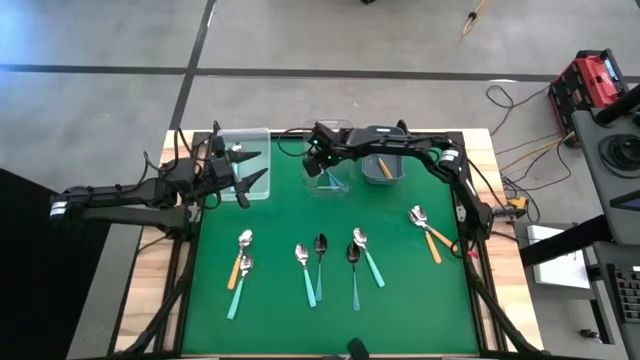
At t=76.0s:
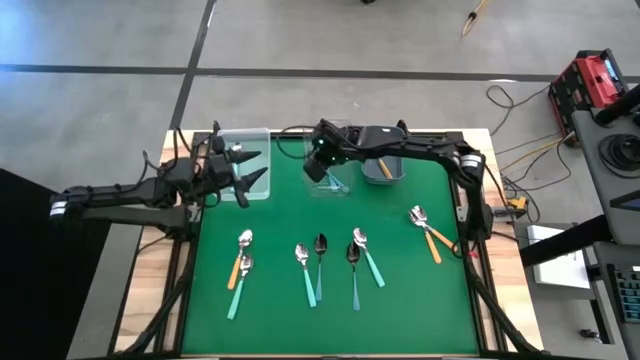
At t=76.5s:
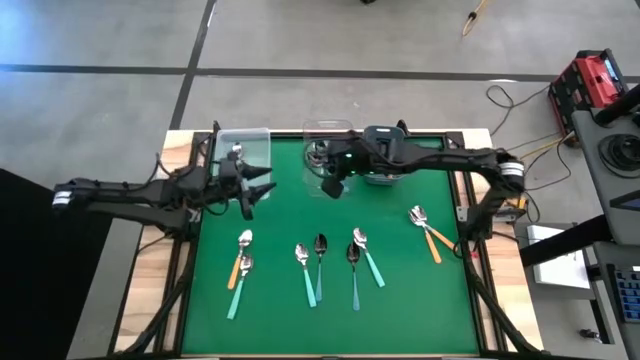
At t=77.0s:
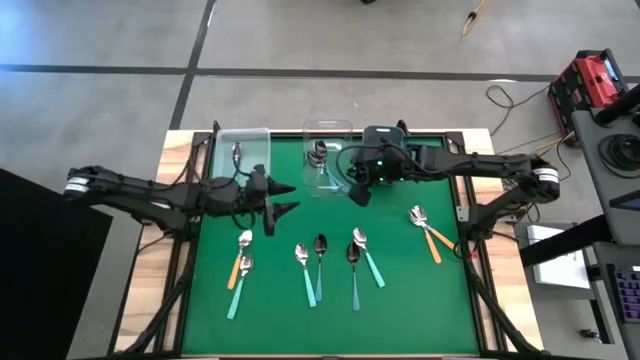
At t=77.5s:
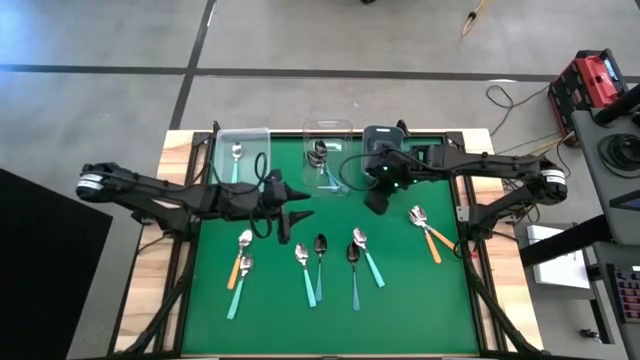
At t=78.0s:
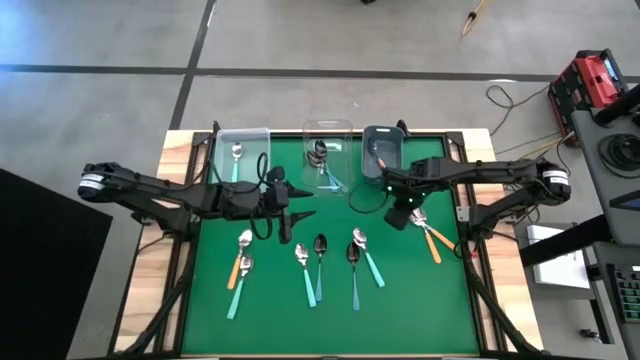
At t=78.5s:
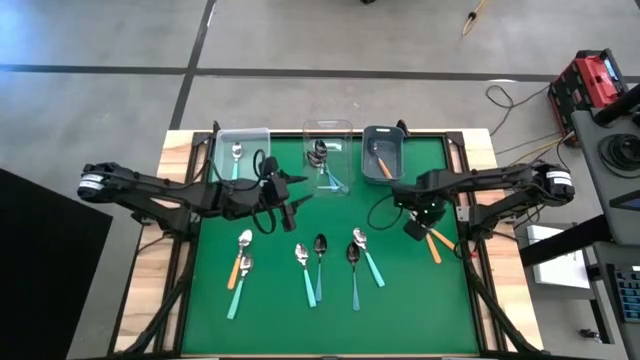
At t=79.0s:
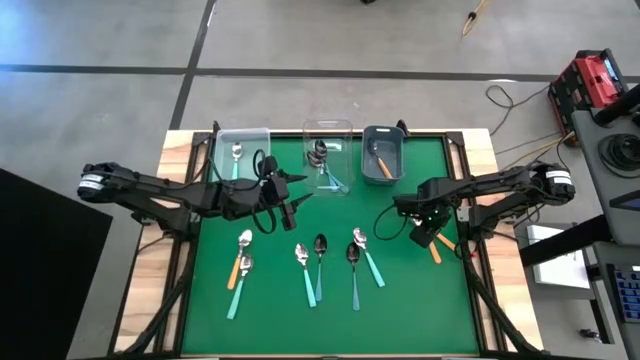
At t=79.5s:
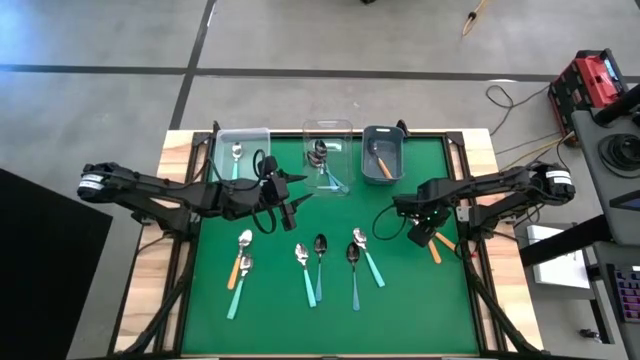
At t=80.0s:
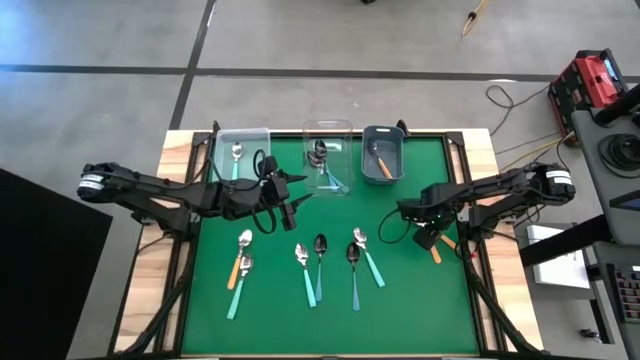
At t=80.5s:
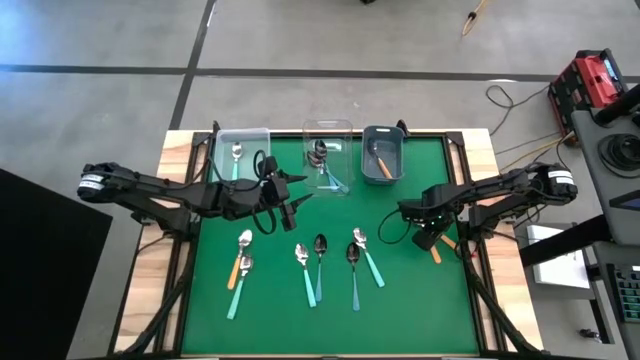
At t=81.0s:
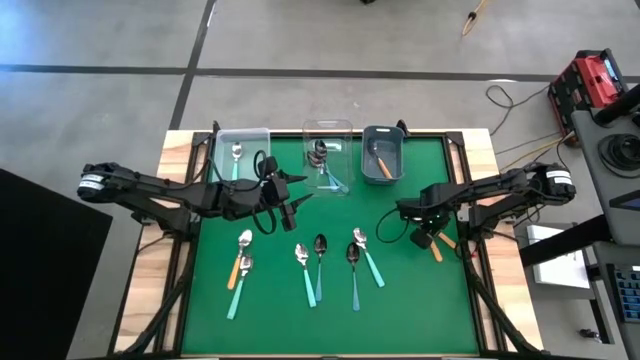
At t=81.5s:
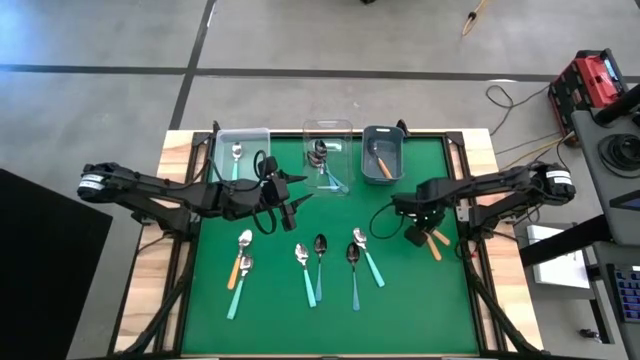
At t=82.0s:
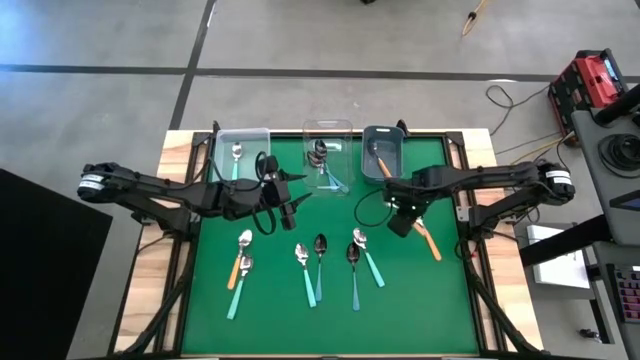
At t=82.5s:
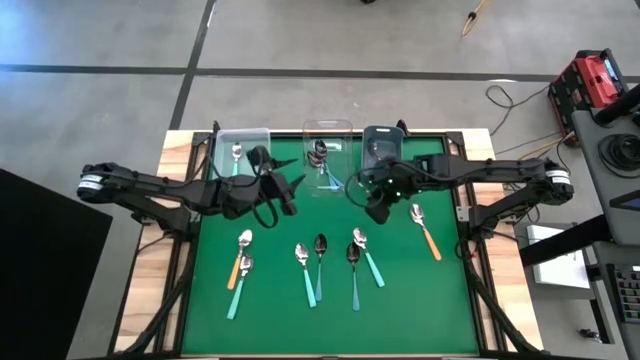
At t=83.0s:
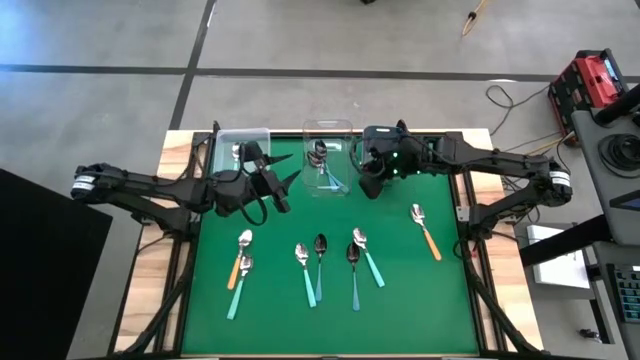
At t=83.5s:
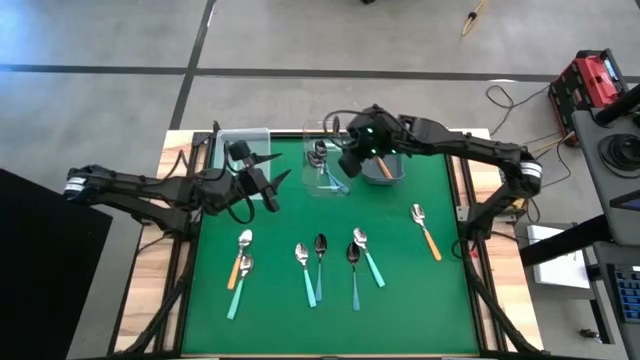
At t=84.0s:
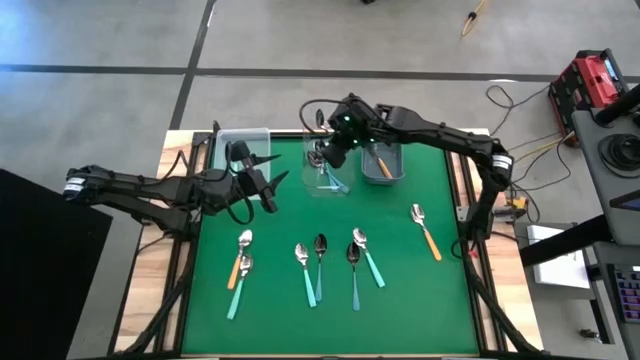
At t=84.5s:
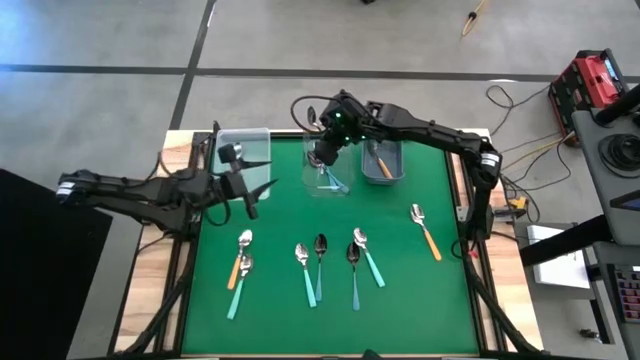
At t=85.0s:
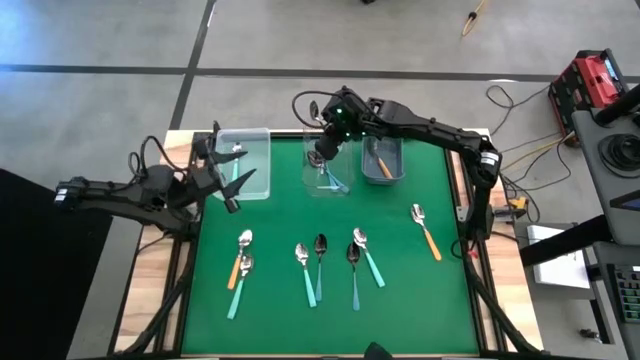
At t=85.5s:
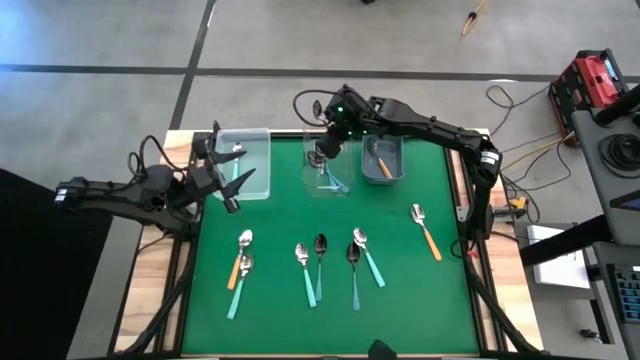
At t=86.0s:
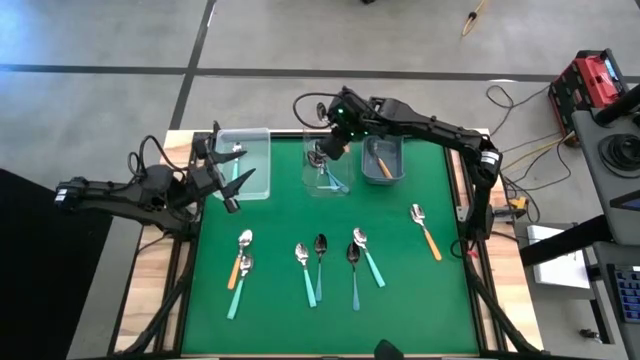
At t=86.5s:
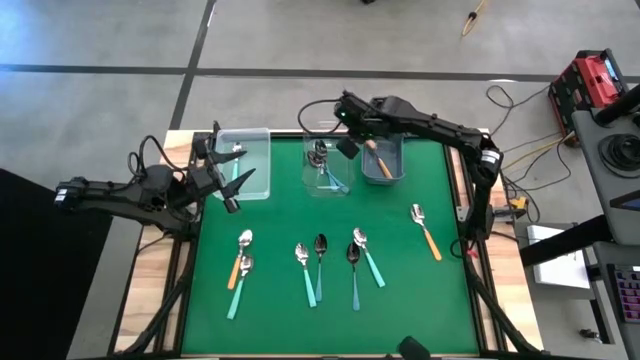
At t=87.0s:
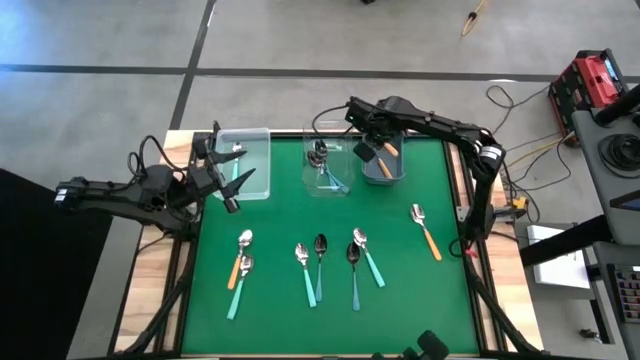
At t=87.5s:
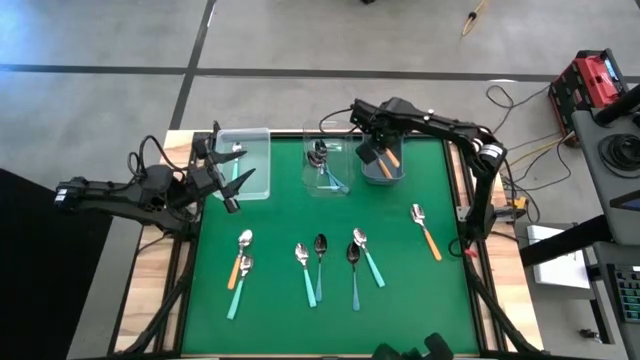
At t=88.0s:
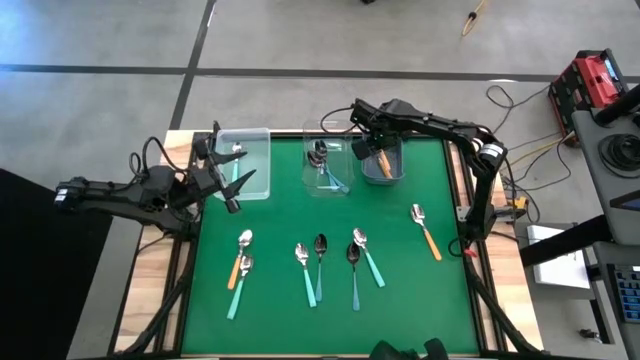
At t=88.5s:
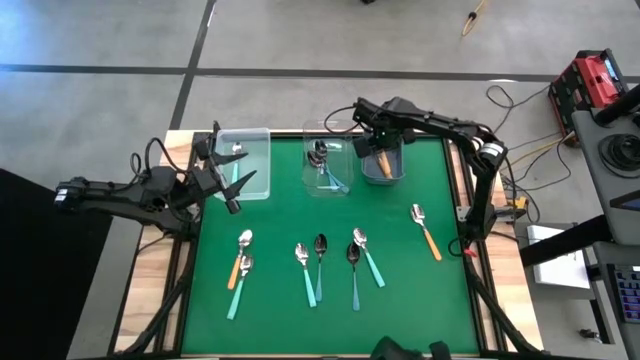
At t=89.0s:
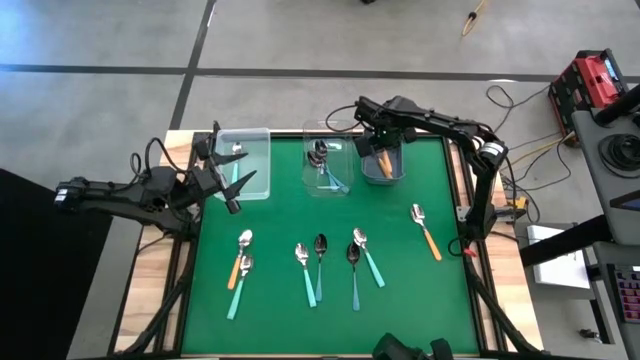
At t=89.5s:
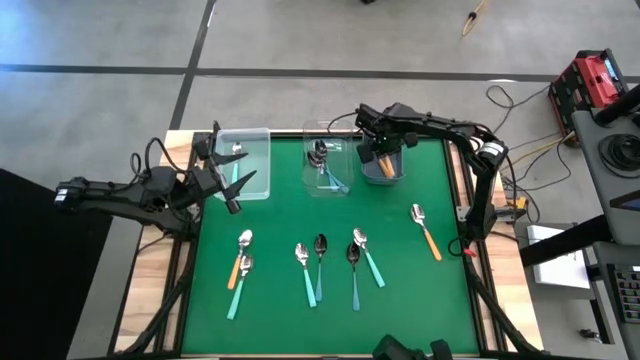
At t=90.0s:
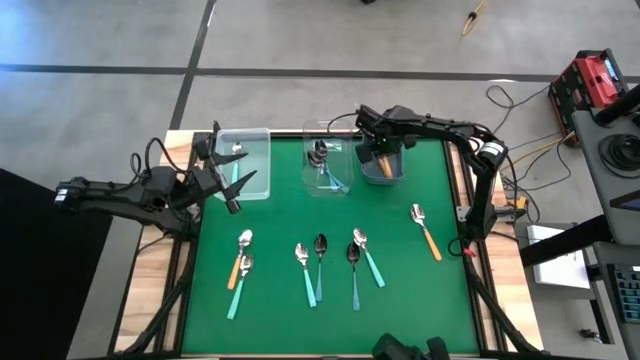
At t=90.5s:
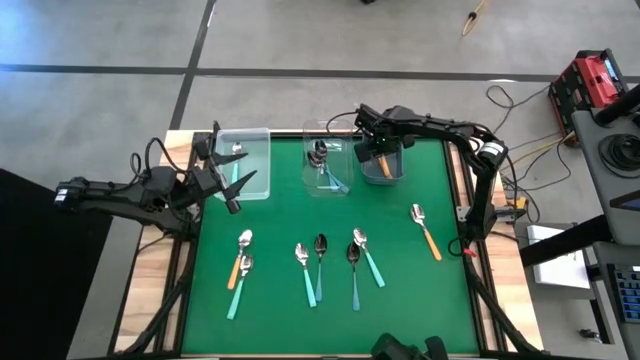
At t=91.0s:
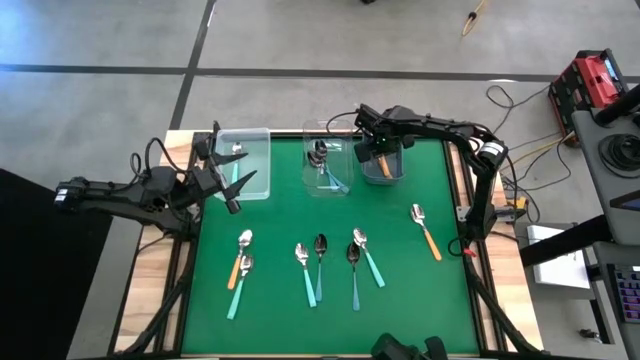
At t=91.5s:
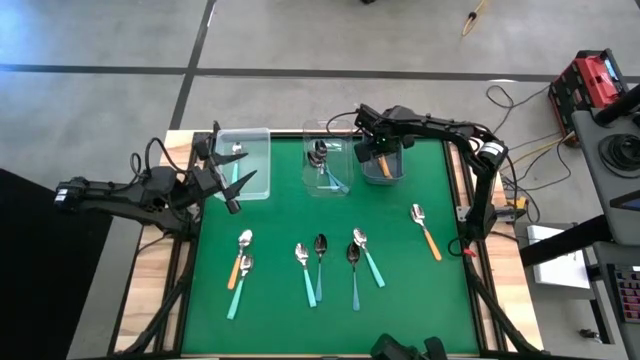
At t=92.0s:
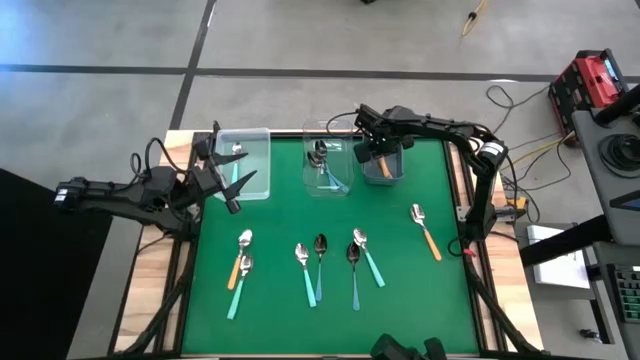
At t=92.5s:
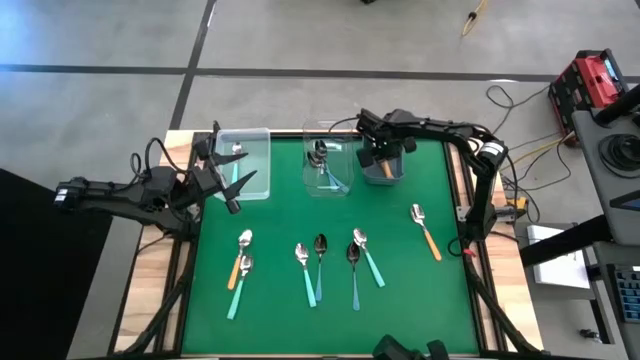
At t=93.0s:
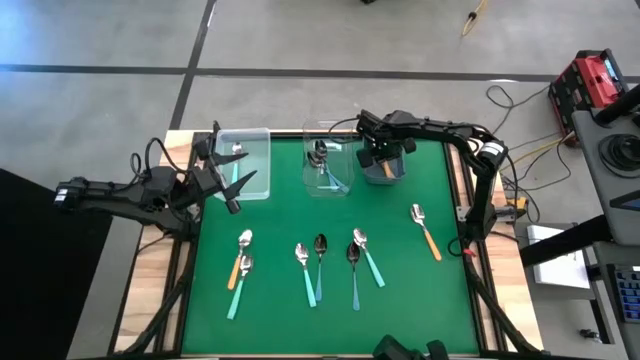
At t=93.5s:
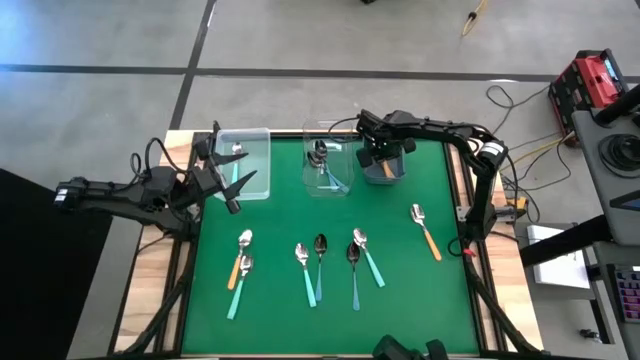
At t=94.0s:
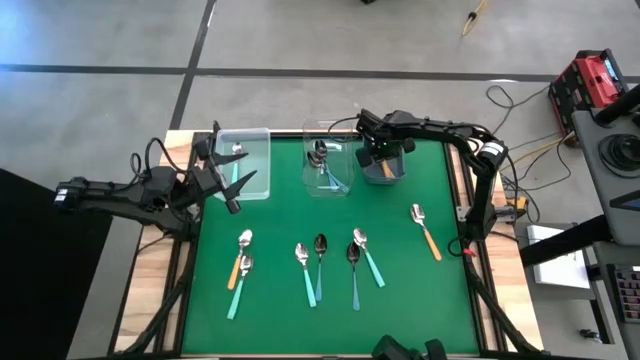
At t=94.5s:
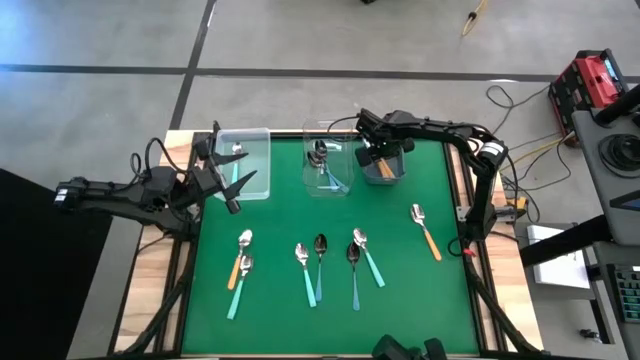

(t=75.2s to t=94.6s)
Task: Sort silverware by color (type)
Put the yellow spoon into the blue bin
